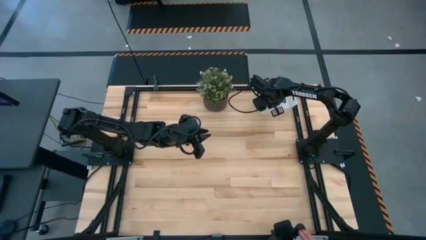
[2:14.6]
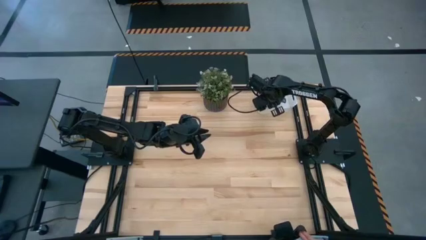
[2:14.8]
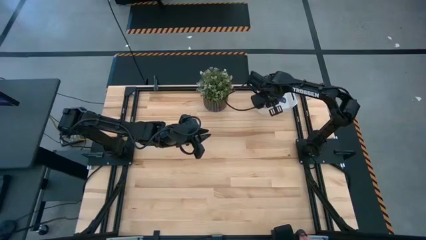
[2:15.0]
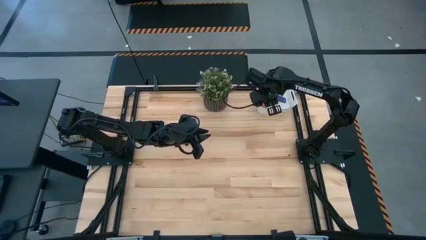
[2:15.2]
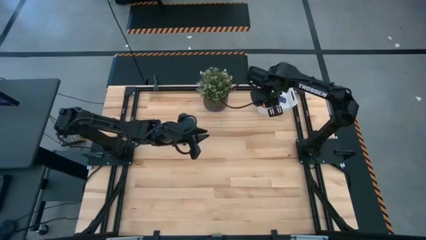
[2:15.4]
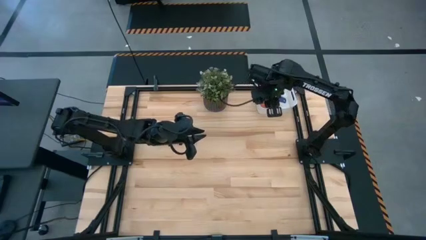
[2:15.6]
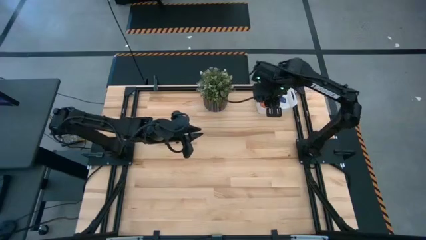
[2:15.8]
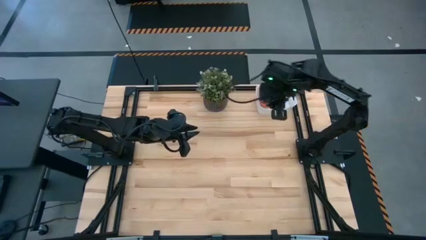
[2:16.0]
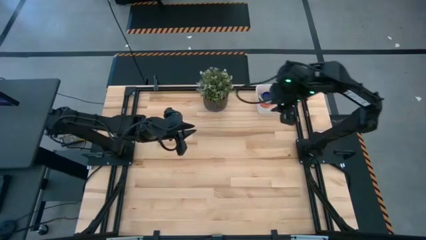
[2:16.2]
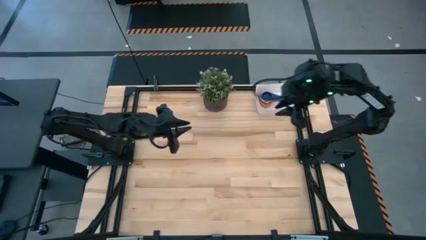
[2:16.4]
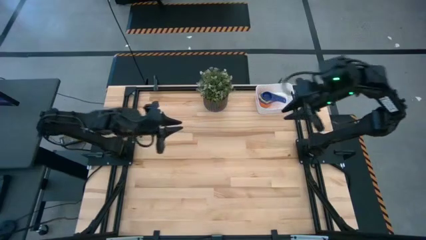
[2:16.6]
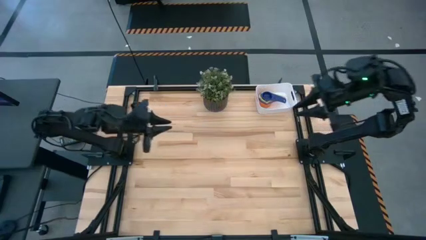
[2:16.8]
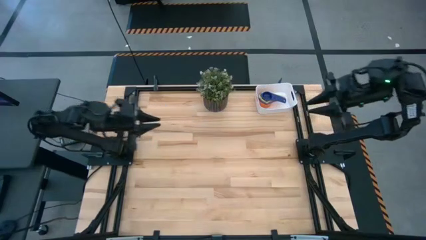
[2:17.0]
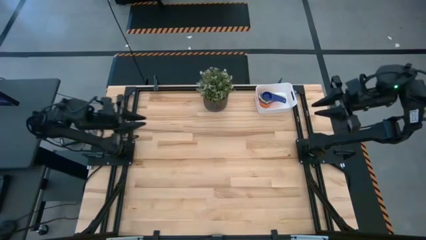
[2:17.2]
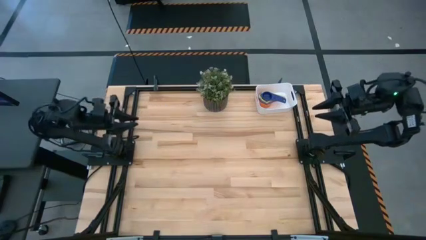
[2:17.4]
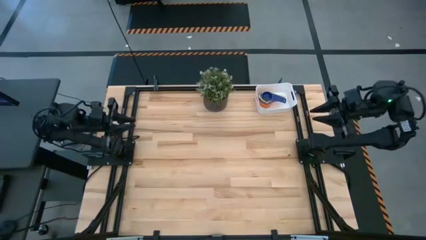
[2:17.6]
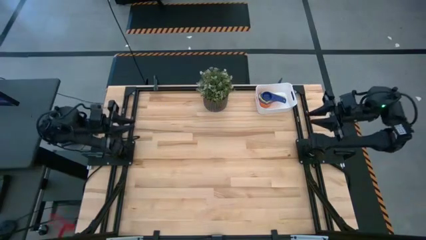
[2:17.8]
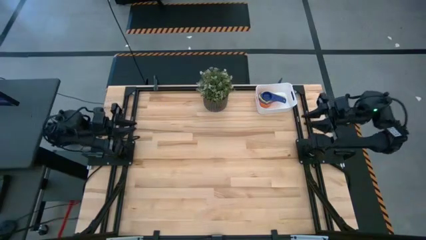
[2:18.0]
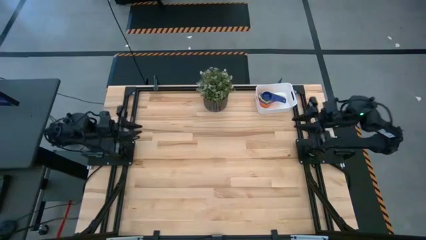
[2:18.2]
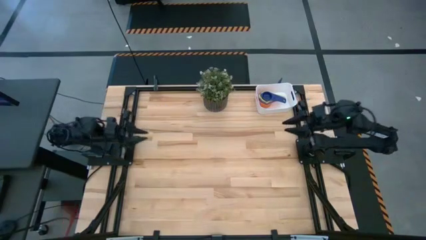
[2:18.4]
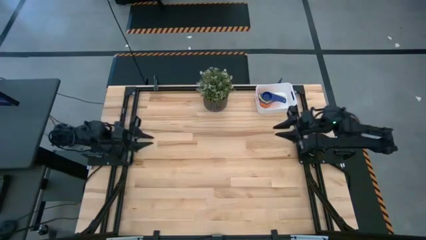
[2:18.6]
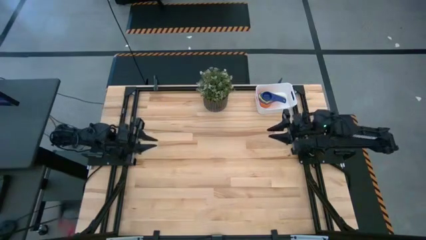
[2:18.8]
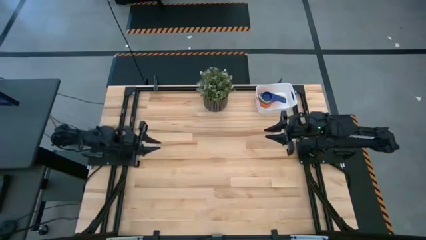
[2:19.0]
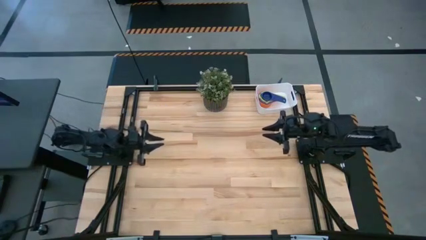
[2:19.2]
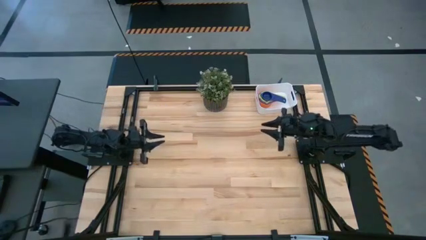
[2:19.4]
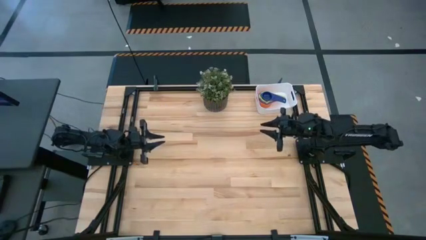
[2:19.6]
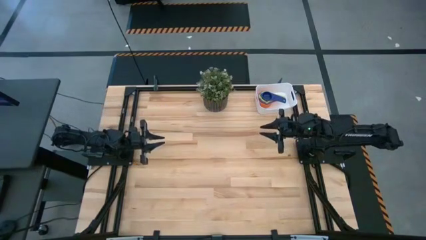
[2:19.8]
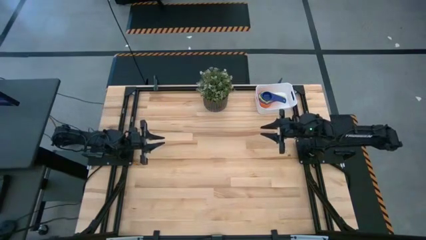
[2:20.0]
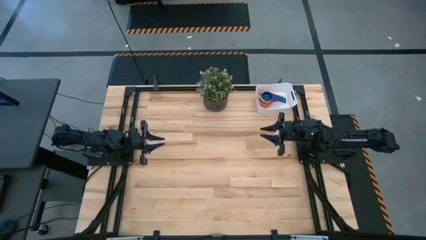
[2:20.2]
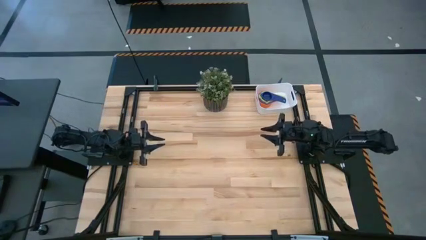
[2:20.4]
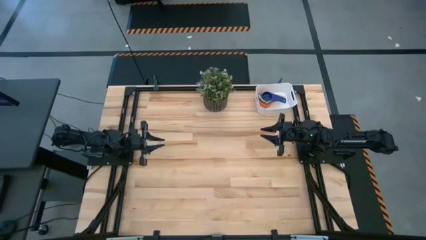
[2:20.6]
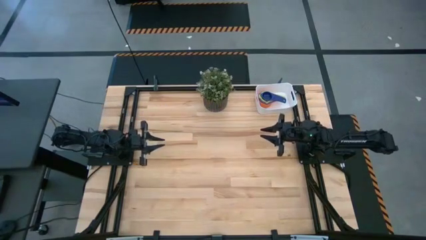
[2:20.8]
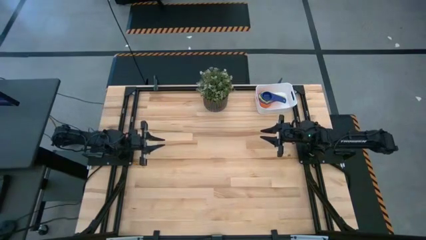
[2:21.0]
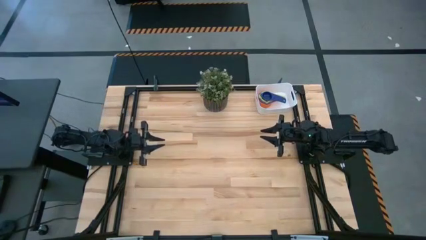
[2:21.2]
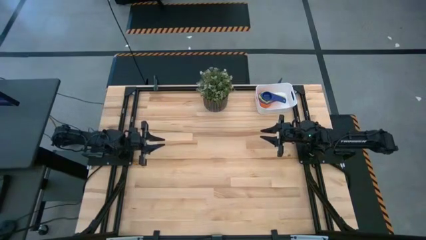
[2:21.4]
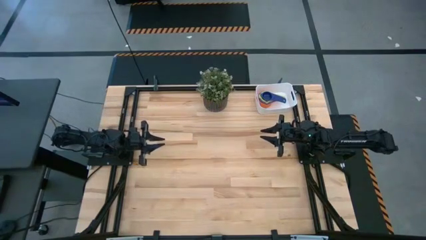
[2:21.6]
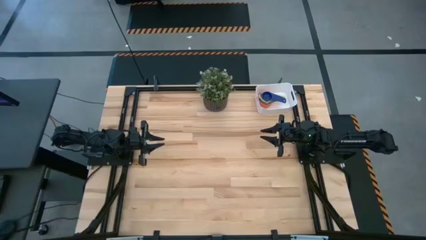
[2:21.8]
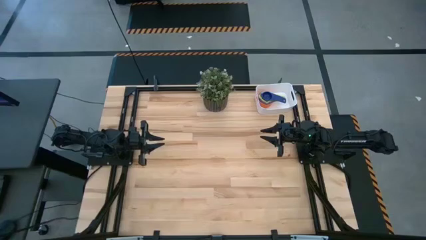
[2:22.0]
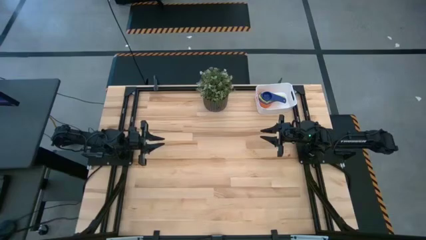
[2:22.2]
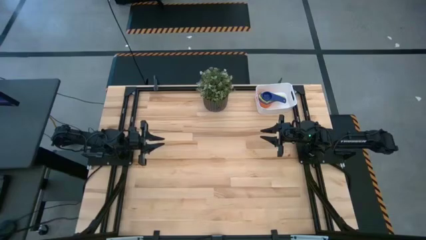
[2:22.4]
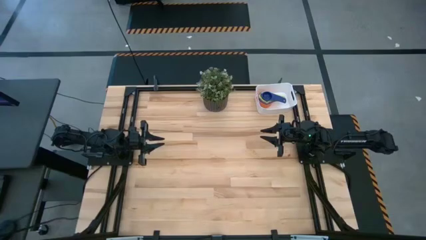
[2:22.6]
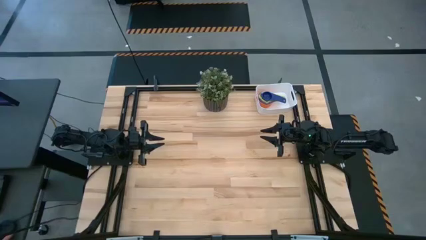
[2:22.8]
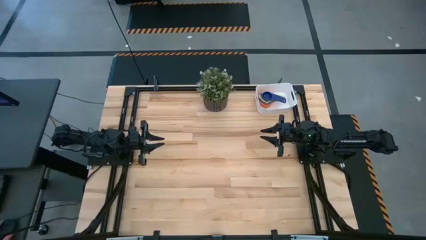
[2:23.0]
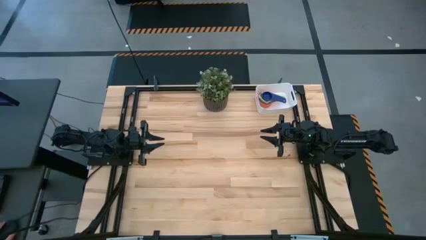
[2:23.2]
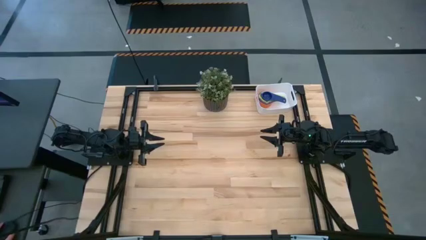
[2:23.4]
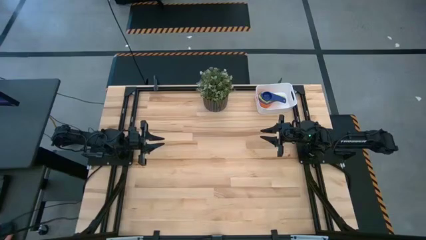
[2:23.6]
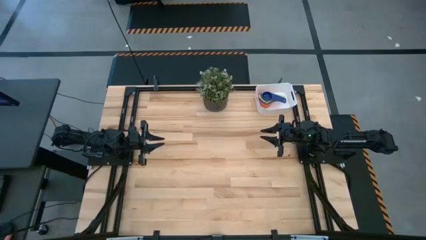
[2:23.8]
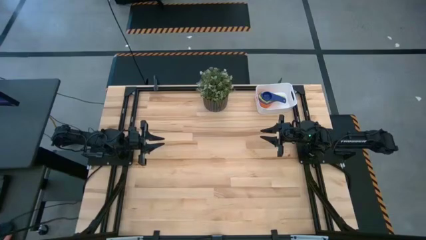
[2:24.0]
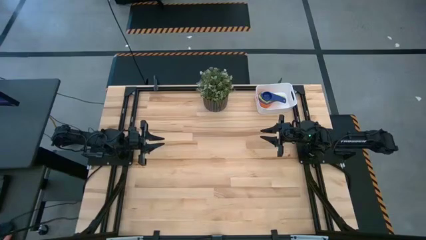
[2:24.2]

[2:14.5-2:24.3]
Task: Nest measuring cups in basket
Return to Home Position

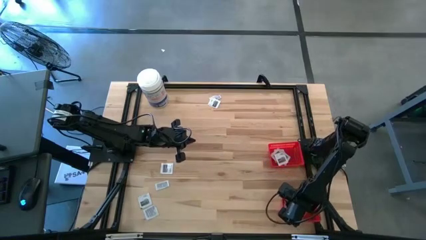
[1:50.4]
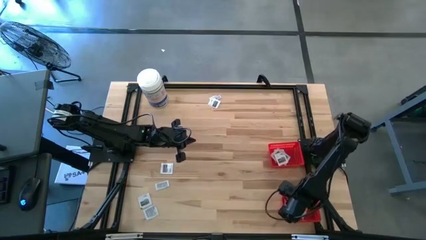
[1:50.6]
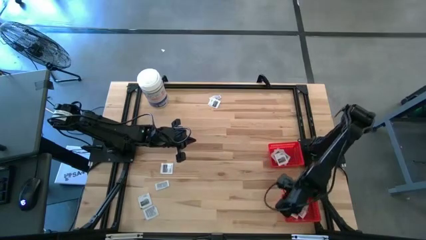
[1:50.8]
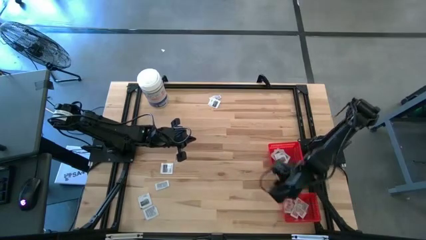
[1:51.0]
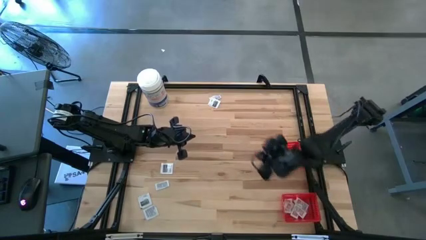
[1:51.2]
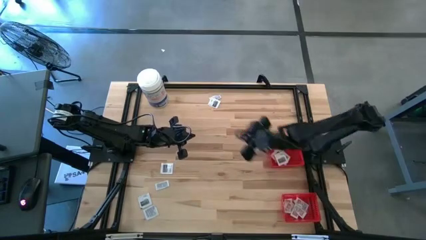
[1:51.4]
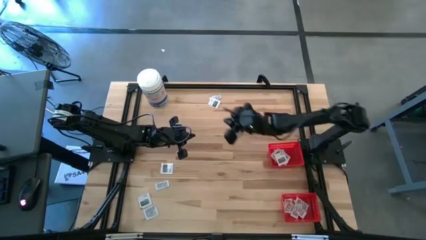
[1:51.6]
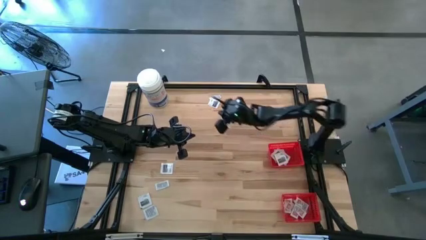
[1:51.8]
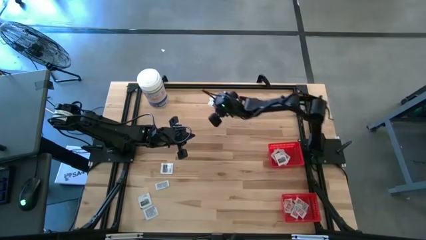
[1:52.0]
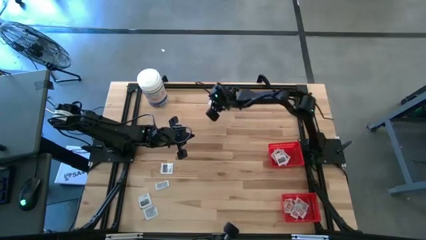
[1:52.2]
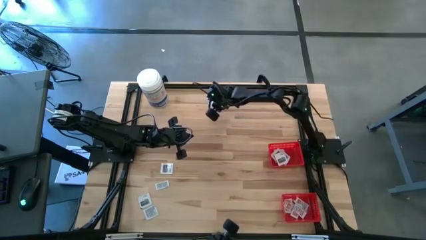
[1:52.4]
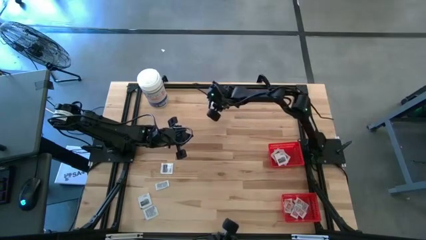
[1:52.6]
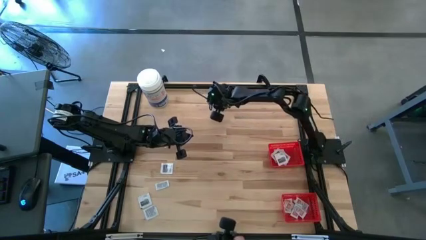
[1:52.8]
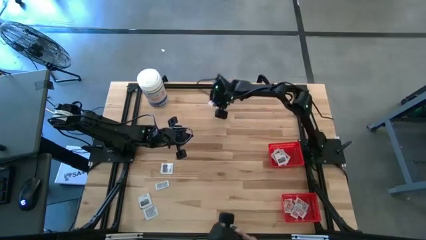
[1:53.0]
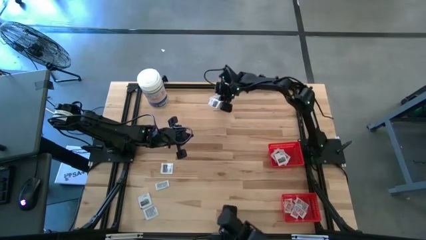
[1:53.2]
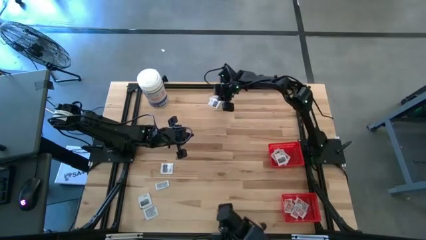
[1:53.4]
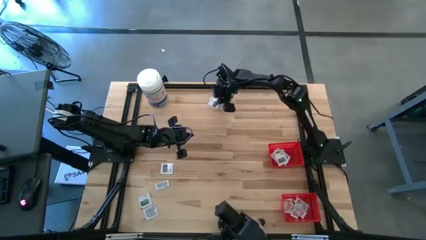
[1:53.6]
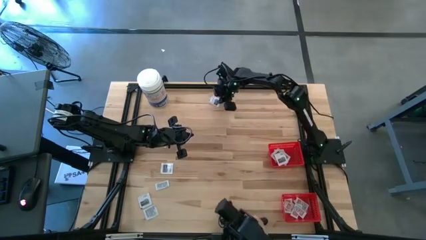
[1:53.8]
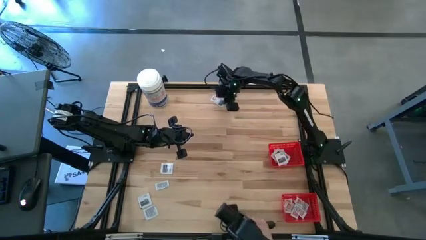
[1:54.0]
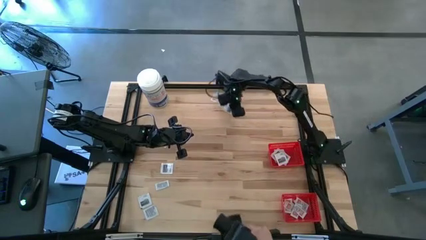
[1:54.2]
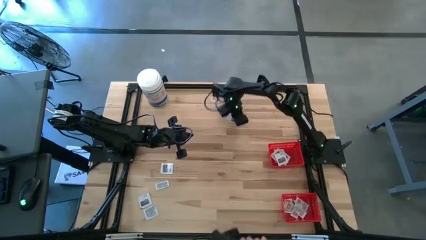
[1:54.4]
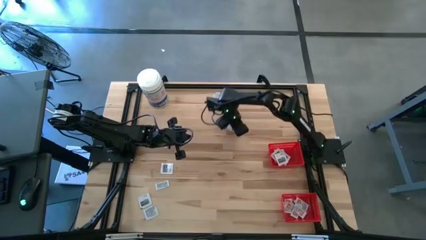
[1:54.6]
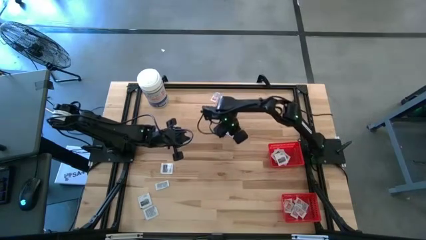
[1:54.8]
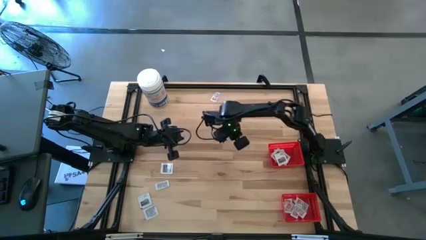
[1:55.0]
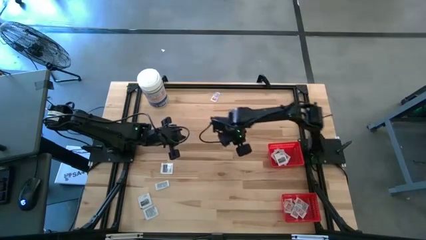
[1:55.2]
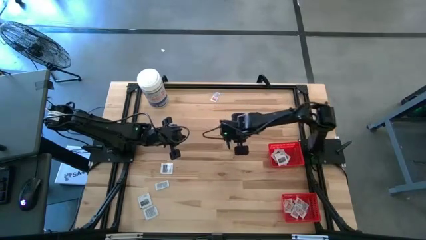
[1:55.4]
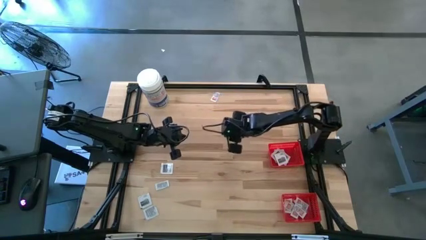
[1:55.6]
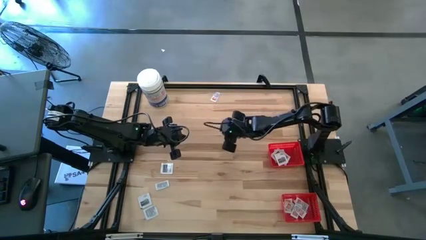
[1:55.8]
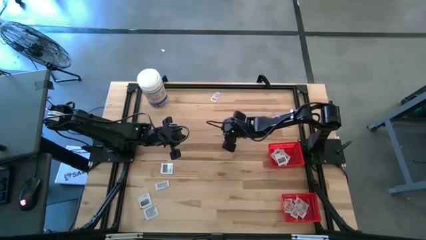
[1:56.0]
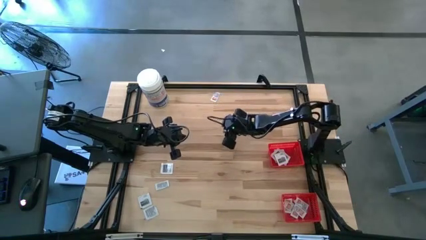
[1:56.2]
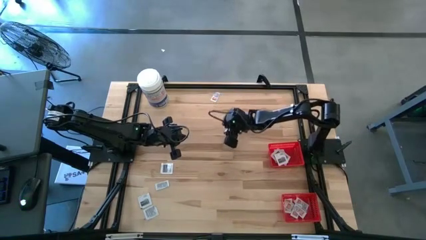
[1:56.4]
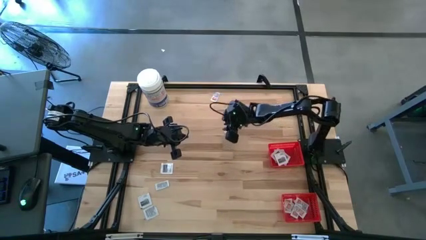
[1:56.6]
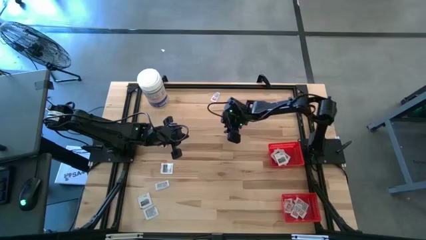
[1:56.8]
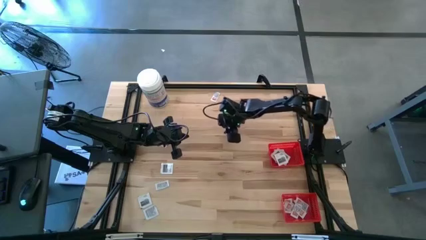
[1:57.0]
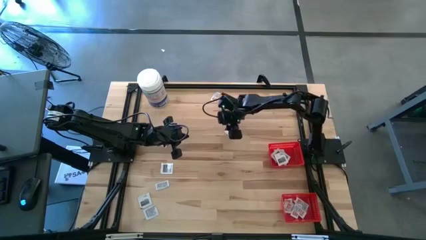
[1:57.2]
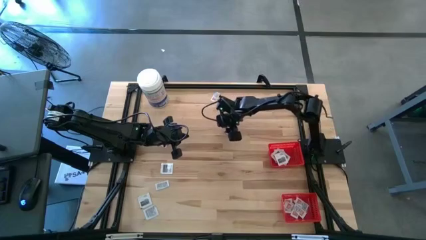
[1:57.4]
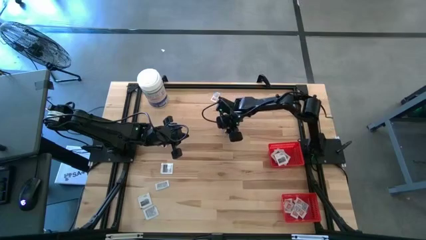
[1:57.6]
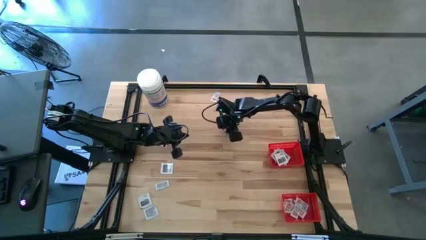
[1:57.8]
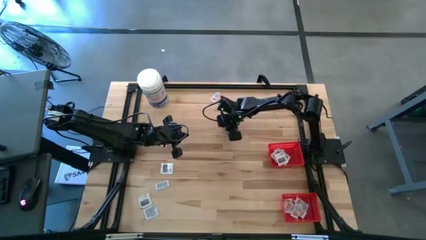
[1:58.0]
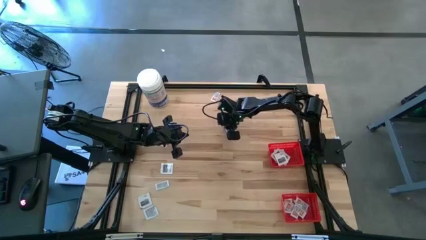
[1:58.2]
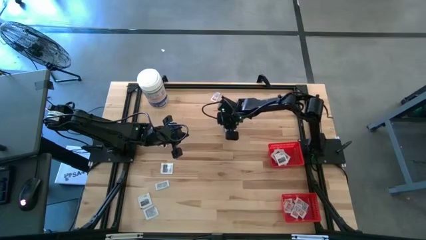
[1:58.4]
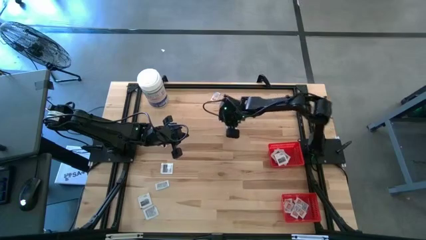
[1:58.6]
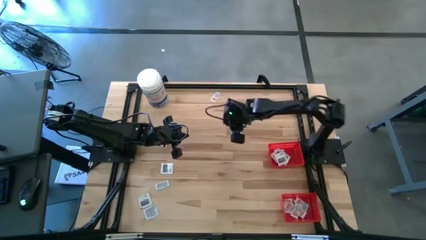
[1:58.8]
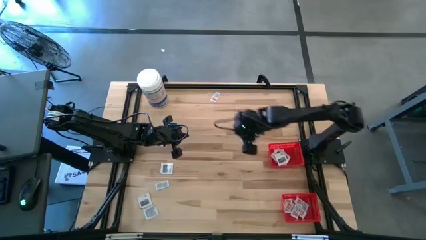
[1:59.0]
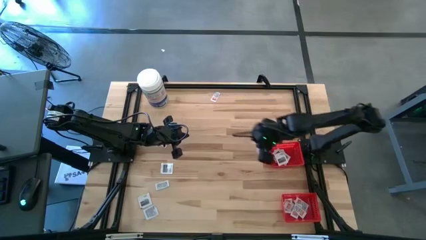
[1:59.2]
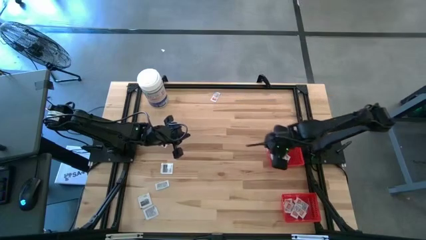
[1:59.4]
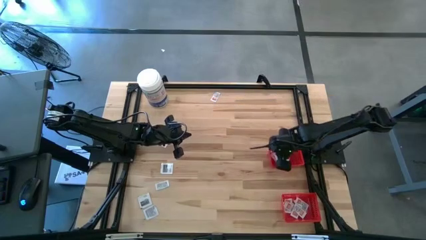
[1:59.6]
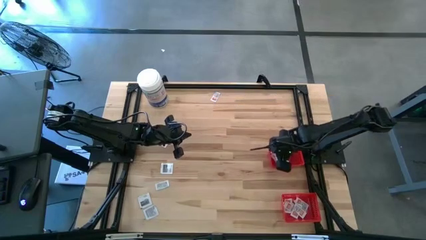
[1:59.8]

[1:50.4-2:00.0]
Task: Pick & Place First Aid Supplies
Put the black towelette pack into the top red basket
